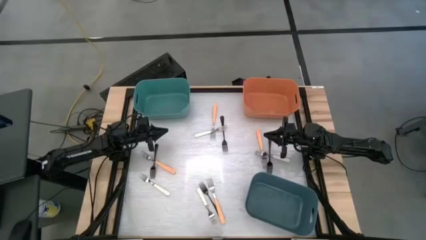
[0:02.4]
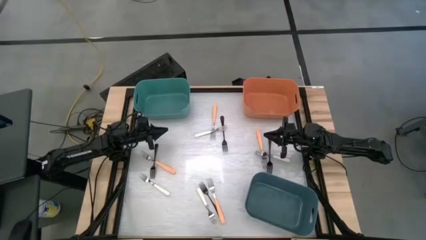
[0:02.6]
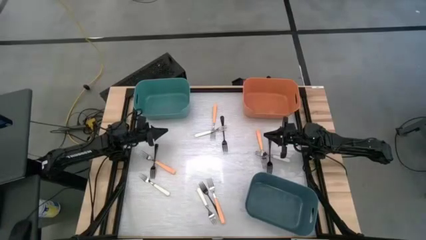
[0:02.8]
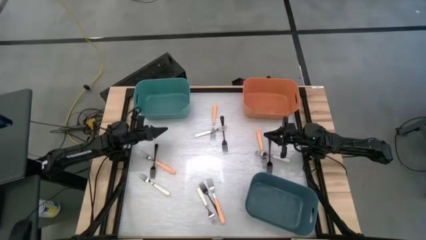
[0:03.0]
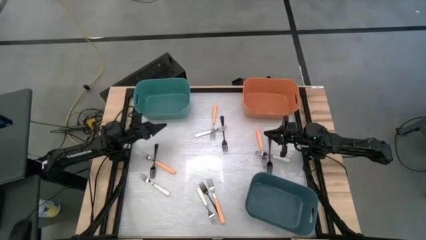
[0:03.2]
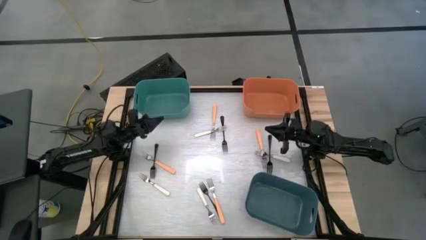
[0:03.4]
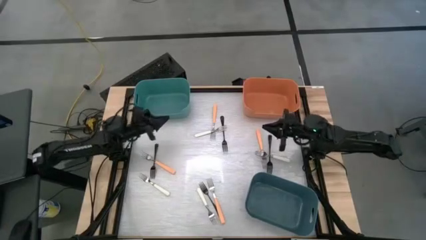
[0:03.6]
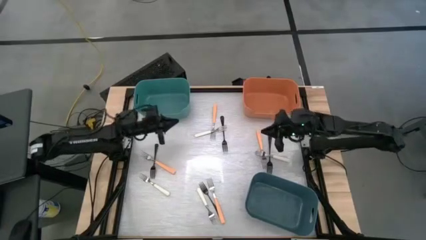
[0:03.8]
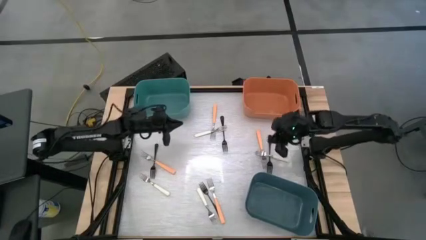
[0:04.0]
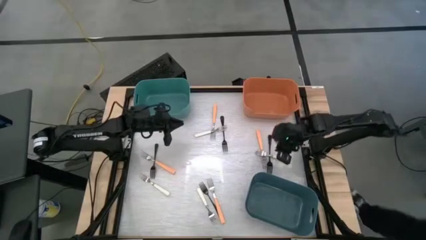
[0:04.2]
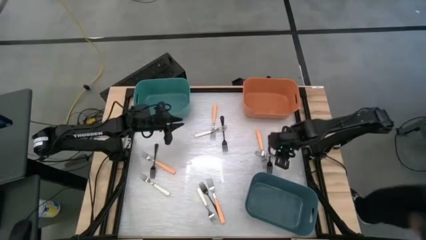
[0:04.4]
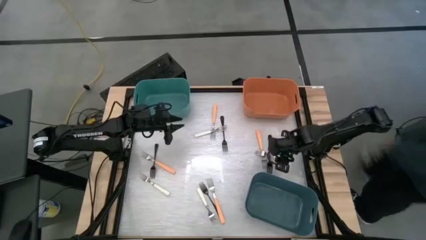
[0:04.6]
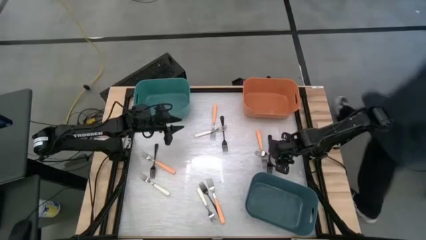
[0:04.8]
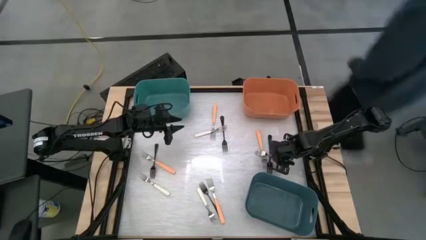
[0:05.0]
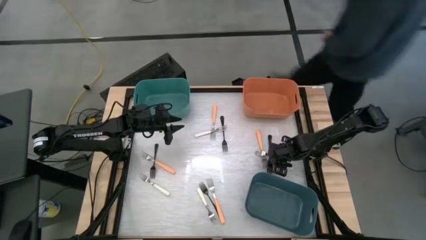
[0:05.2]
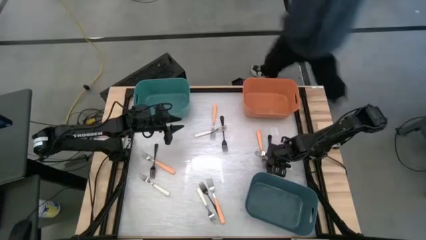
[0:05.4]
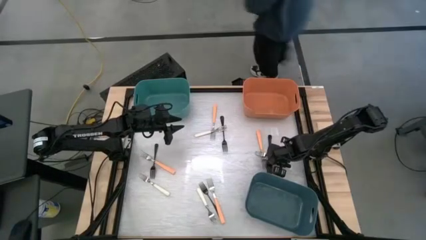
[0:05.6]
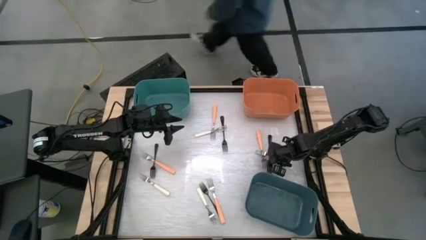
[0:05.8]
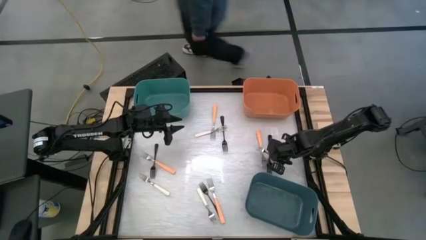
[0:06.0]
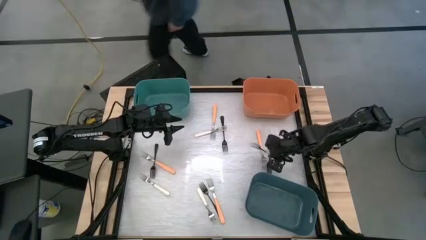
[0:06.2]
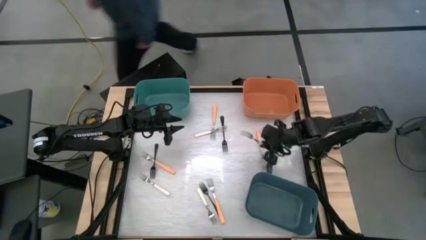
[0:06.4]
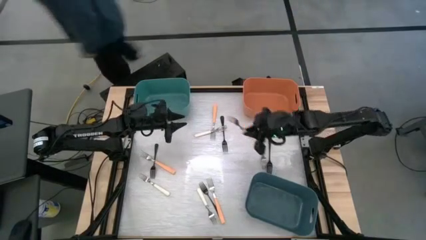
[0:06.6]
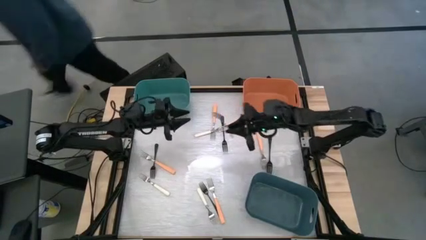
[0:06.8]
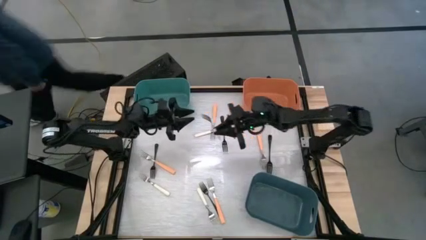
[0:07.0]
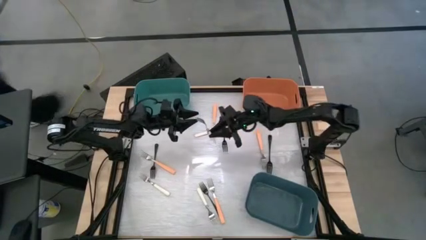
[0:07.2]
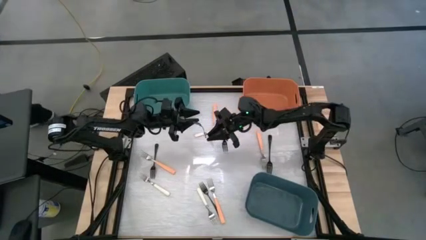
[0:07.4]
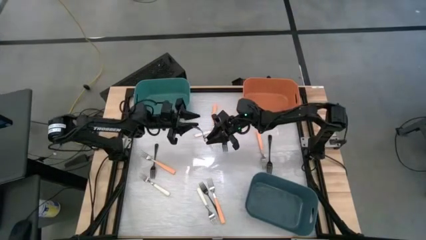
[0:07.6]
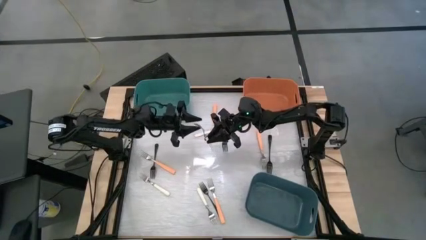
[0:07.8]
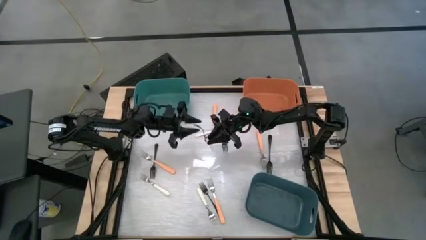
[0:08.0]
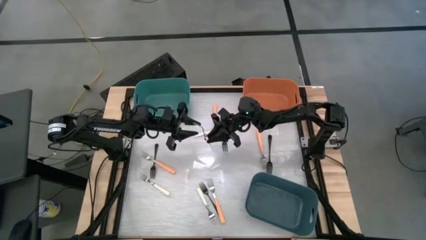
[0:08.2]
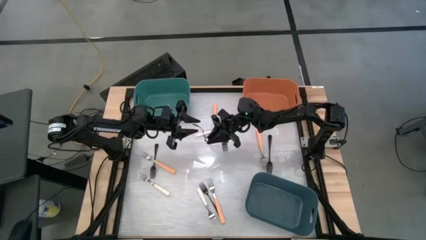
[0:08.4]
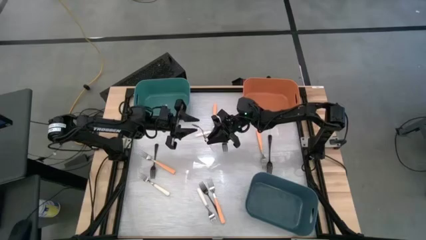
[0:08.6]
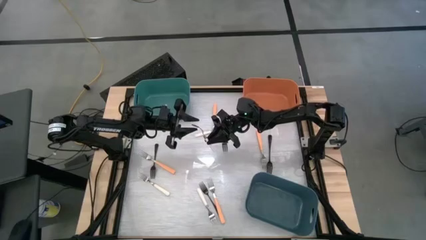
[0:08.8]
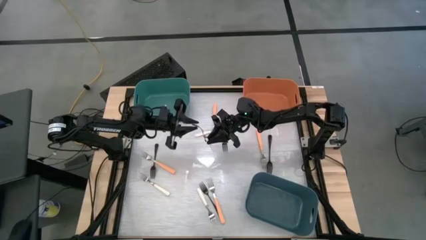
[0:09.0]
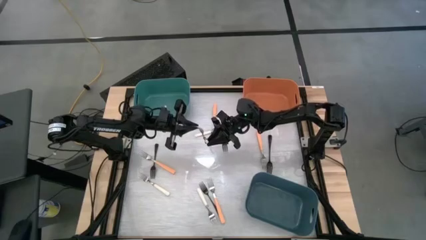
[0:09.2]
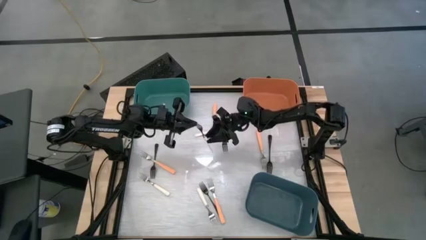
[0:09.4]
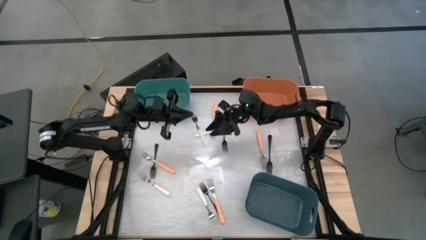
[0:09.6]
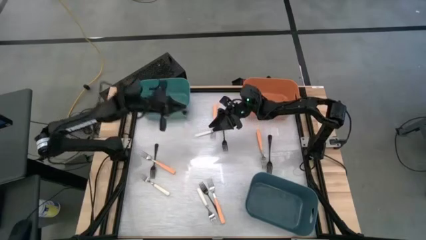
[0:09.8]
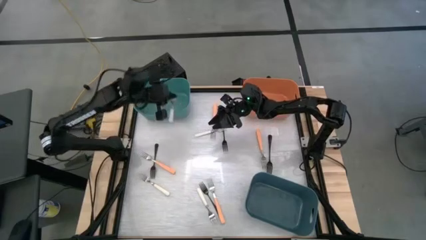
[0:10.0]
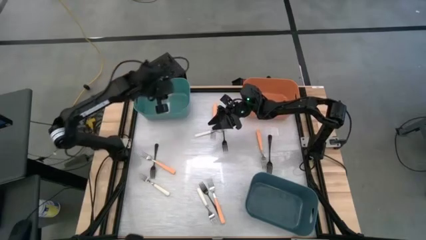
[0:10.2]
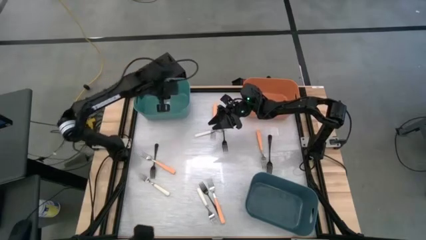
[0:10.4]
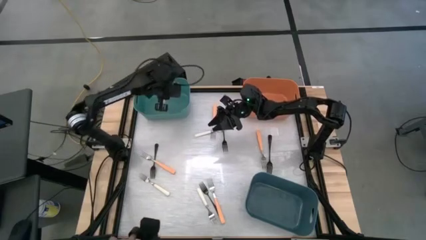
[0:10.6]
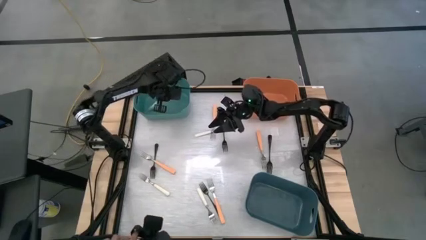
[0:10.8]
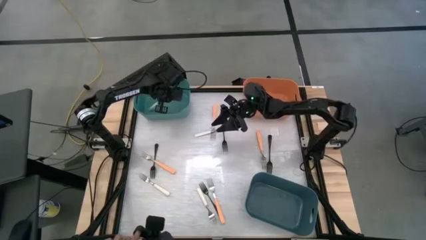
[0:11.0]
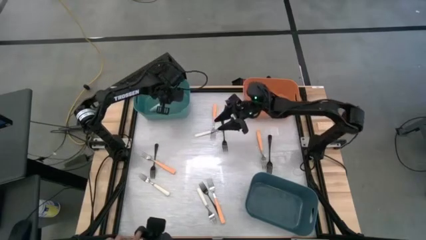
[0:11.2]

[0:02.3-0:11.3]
Task: Sort silverware by color (type)
Put the white fork into the green bin

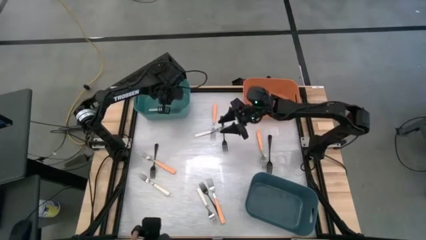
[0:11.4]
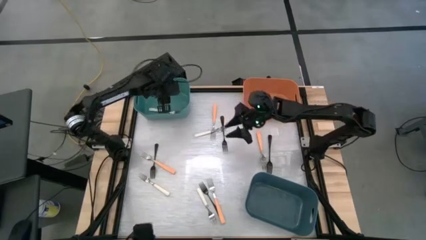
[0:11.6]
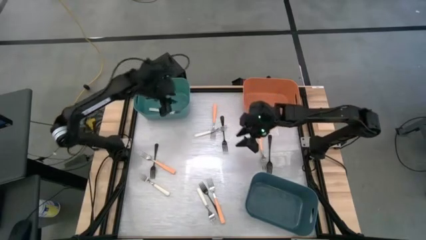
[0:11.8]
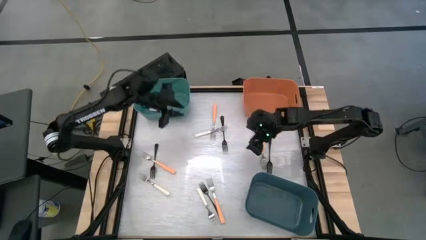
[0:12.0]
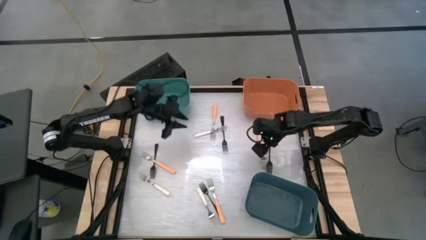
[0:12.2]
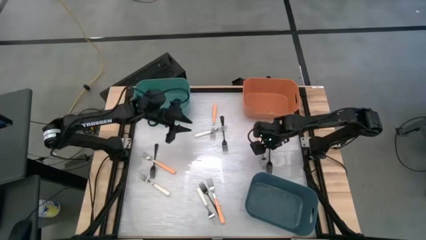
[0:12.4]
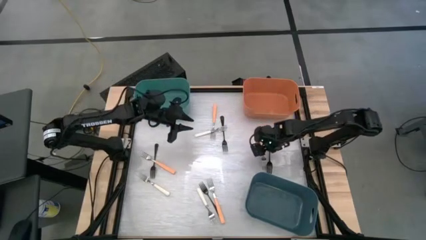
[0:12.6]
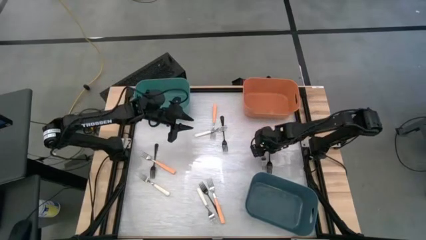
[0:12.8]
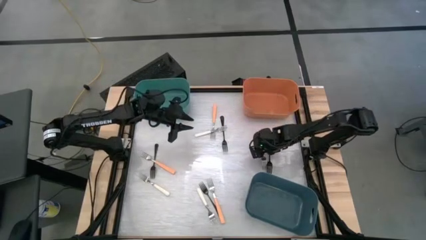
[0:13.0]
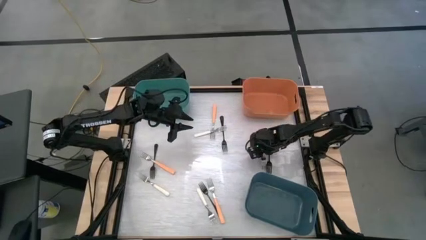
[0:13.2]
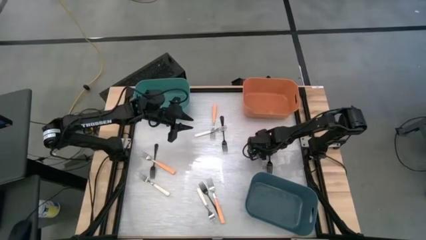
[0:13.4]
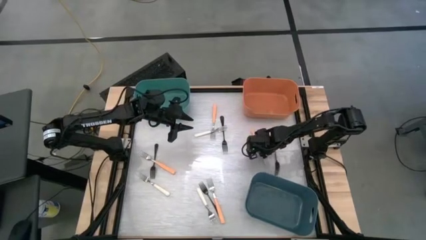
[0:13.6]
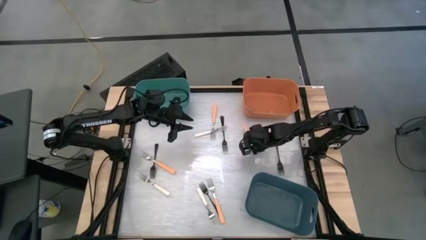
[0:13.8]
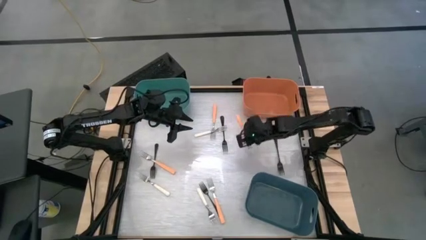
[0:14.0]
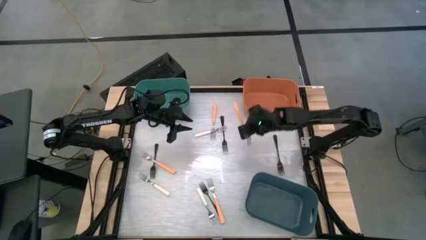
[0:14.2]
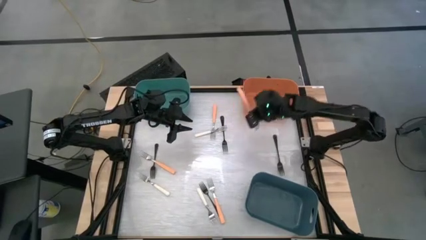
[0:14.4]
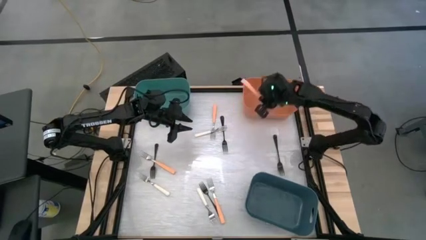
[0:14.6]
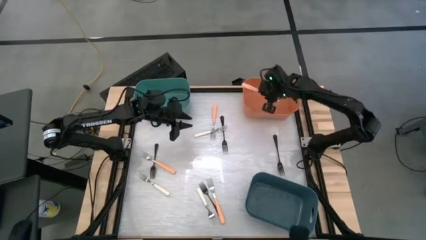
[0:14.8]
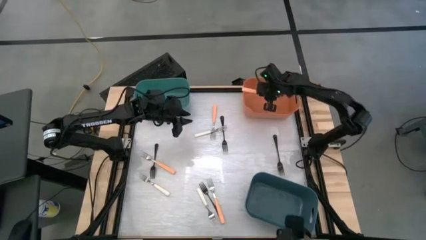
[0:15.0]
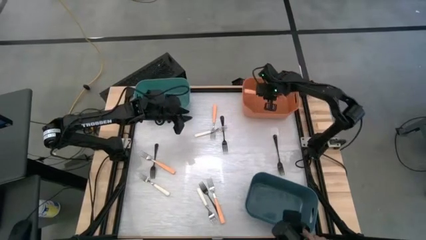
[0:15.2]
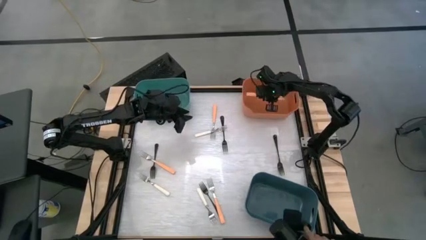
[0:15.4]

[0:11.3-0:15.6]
Put the orange fork into the orange bin

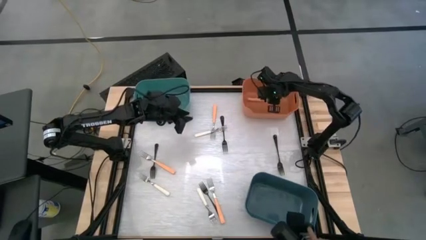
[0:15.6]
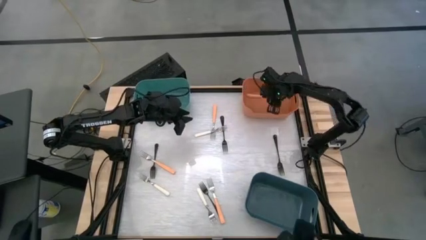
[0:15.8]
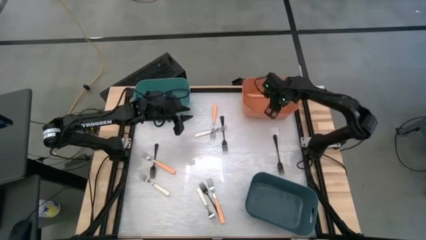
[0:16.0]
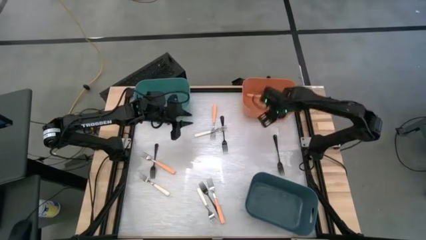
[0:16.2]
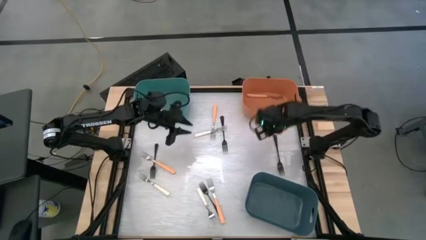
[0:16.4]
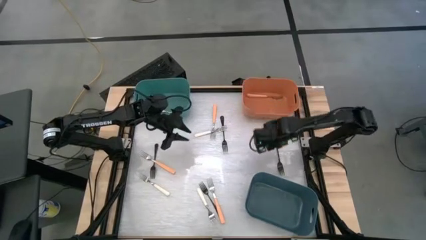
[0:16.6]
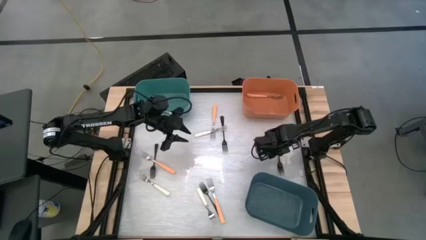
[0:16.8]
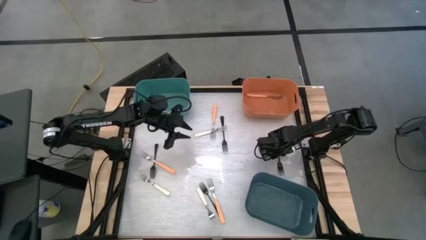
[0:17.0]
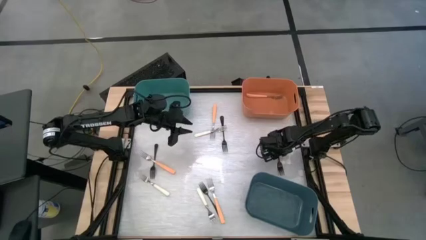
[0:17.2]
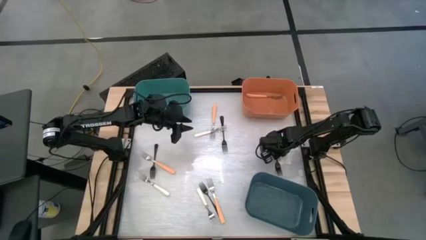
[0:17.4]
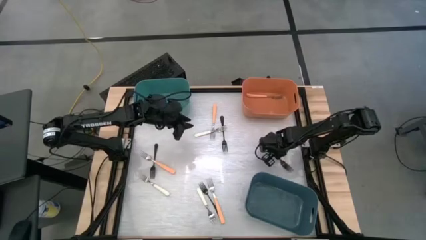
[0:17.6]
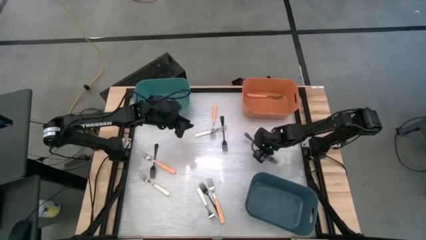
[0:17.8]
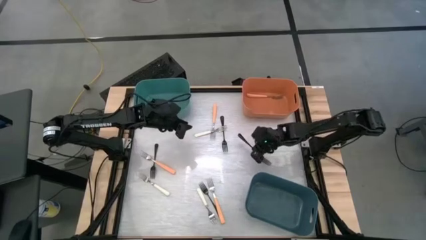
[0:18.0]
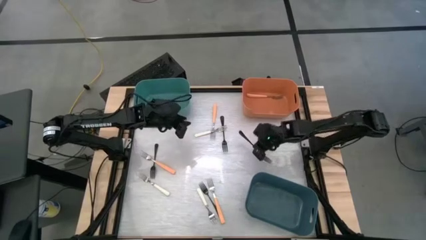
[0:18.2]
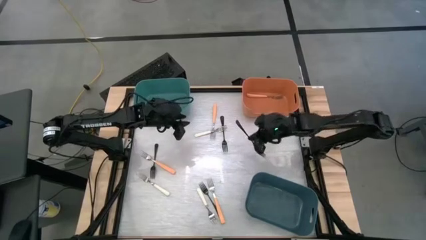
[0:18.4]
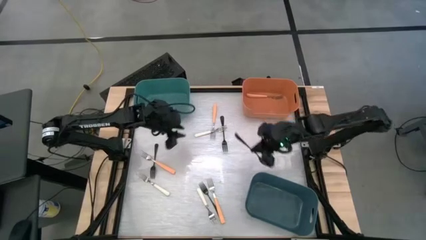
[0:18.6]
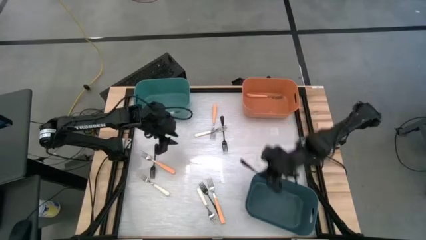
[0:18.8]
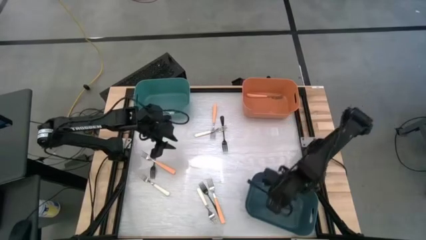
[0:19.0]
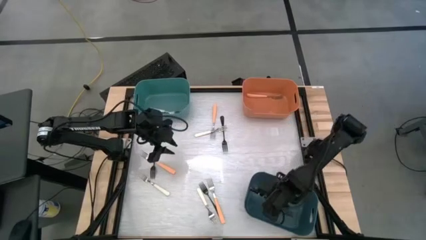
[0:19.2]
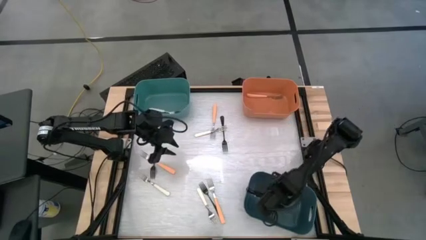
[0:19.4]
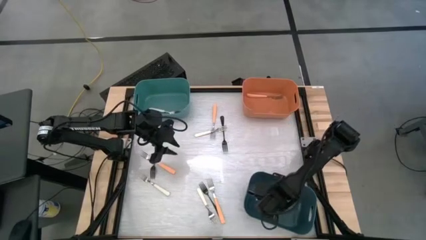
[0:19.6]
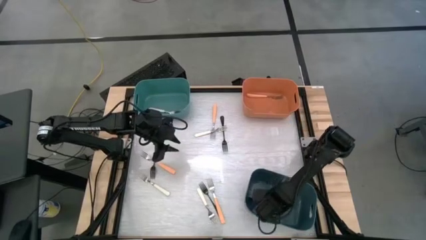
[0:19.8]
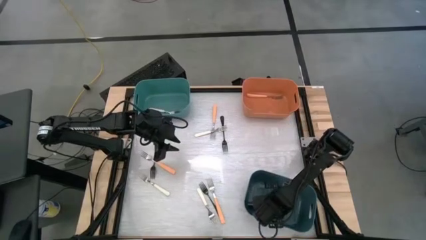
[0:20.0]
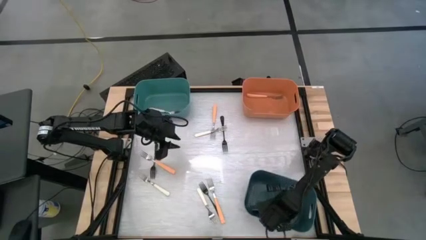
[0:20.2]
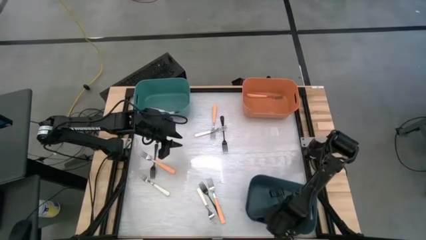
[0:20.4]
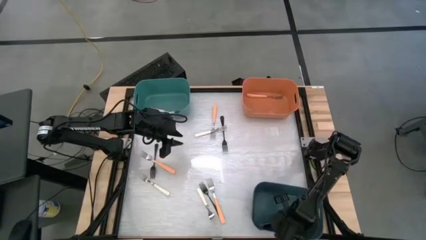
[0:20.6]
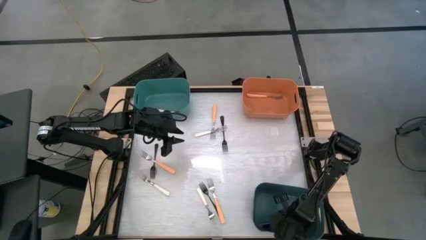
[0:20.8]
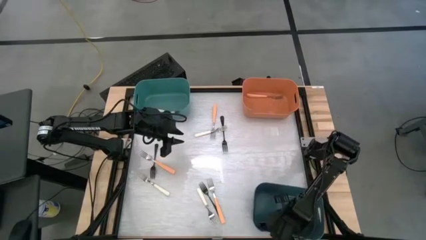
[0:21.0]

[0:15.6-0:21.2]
Put the black fork into the blue bin
